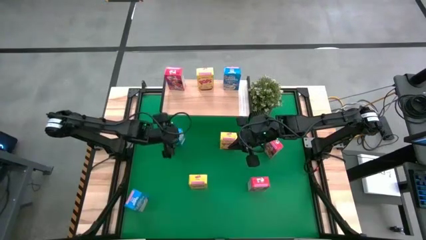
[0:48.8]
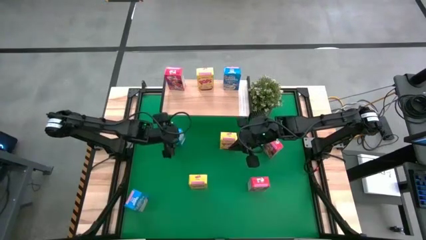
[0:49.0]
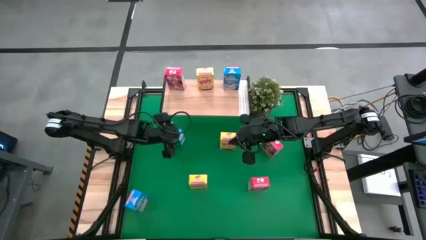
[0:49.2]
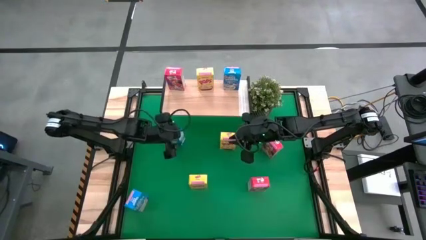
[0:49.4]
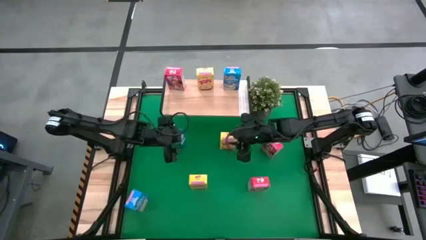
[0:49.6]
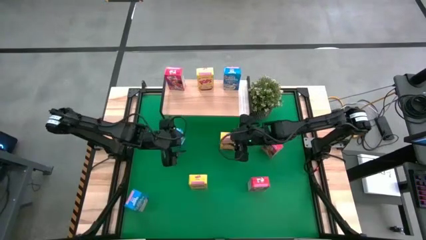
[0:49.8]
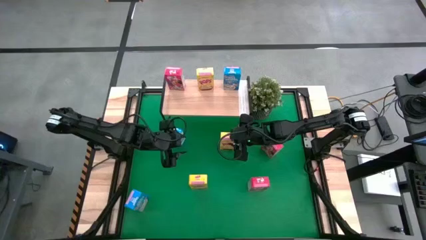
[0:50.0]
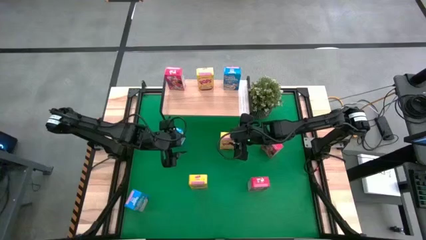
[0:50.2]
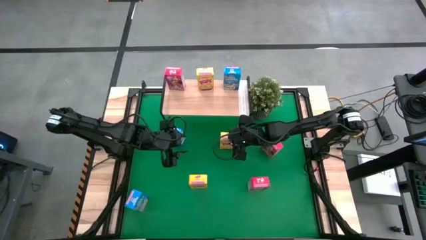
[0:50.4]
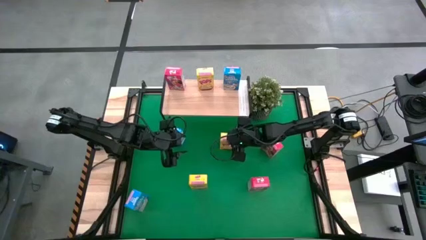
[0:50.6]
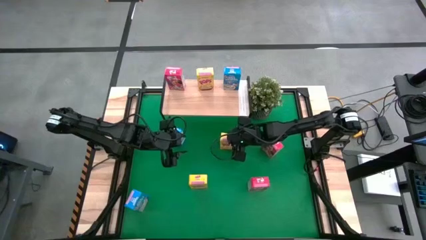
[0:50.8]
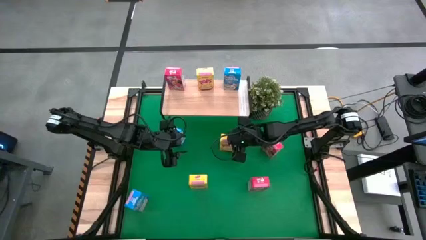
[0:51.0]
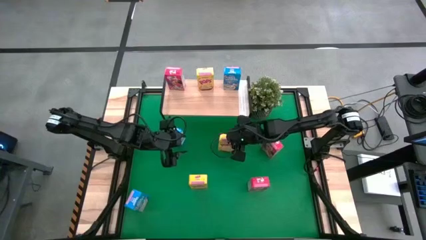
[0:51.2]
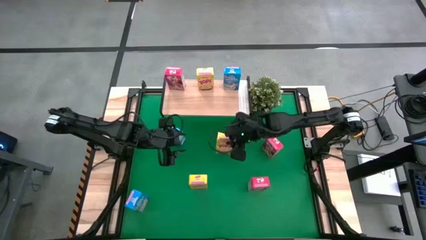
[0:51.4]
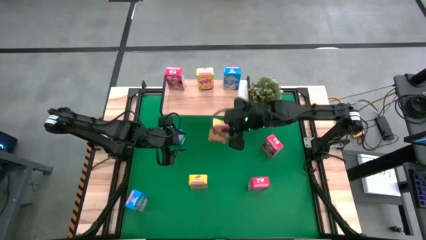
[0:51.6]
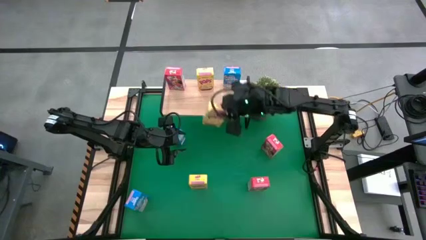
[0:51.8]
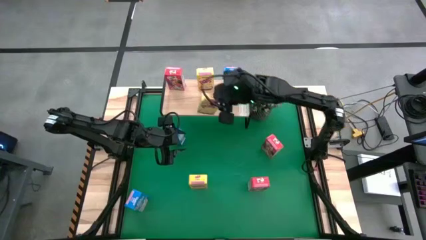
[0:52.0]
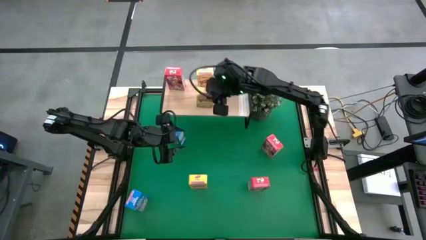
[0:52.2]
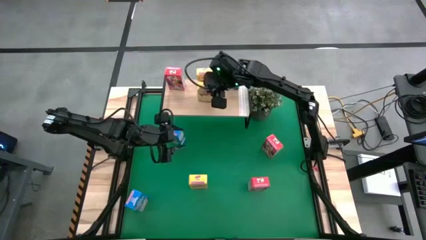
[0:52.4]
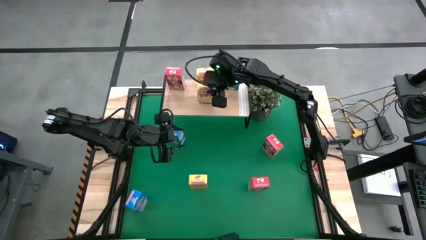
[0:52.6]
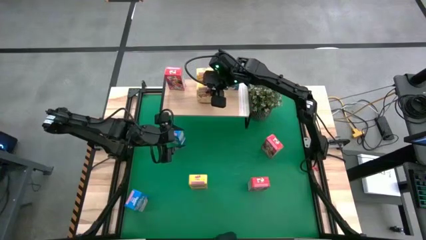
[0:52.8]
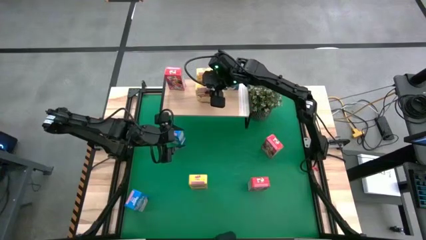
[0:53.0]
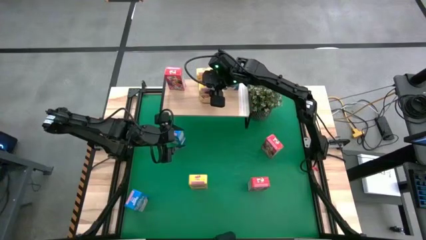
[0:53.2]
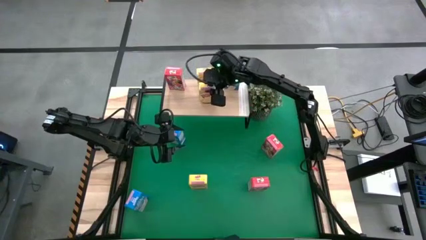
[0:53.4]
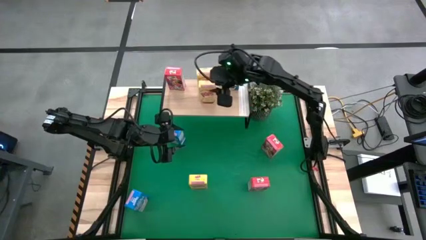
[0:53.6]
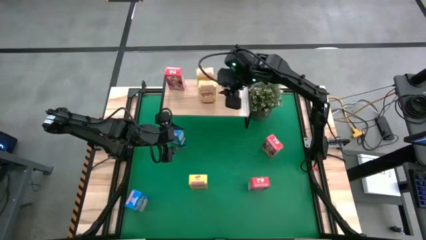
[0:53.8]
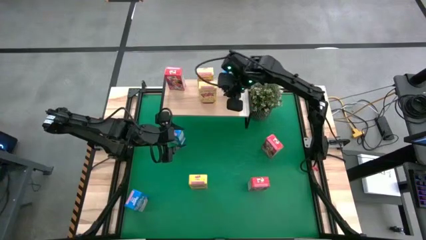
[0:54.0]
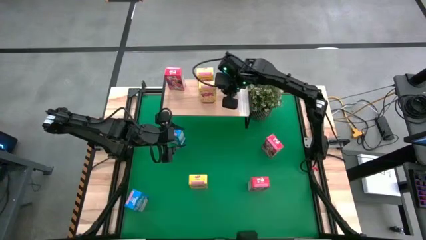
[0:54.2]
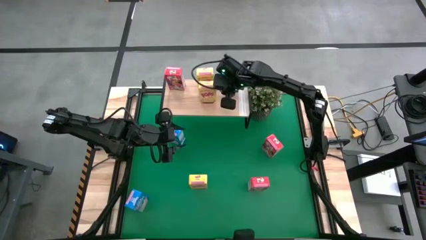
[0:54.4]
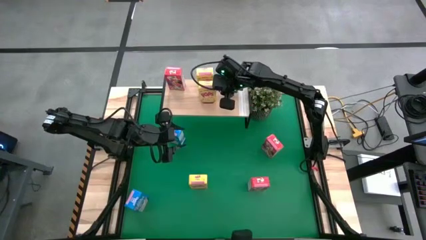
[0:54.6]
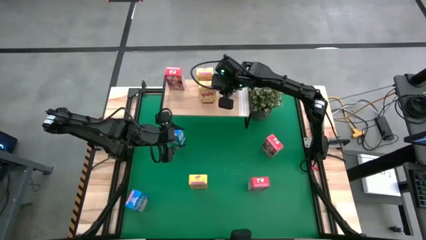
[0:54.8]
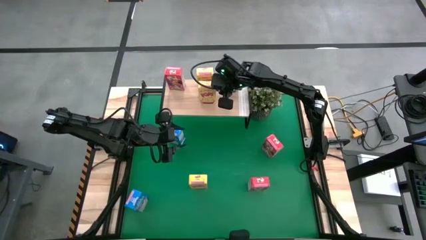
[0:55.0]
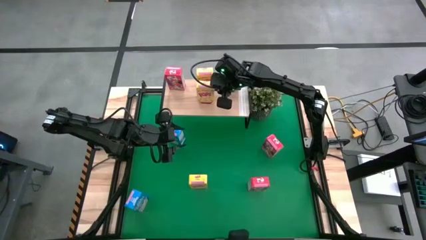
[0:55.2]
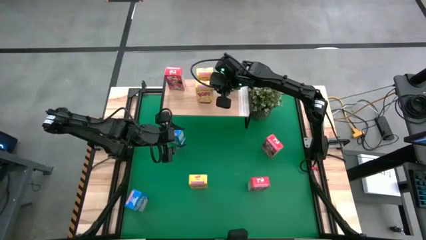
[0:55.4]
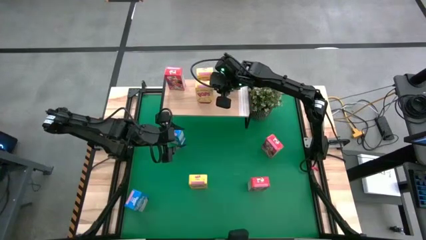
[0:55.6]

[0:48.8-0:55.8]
Task: Stack cereal on shelf
Put the top yellow cereal box on the shelf aligned with the other yellow cereal box

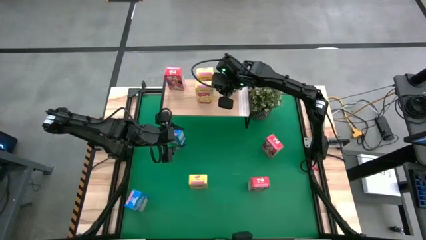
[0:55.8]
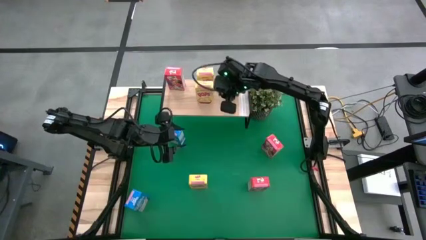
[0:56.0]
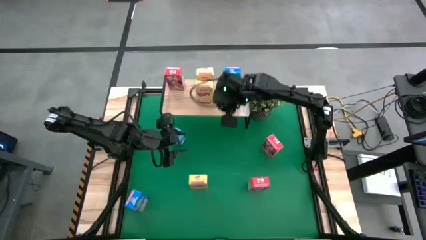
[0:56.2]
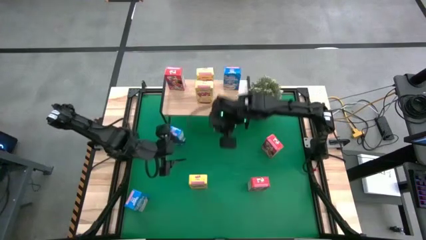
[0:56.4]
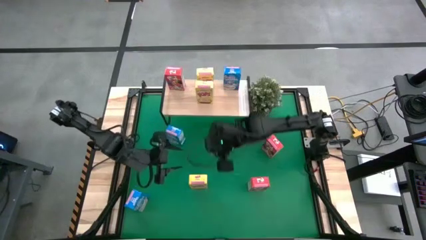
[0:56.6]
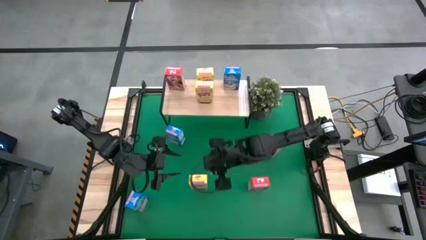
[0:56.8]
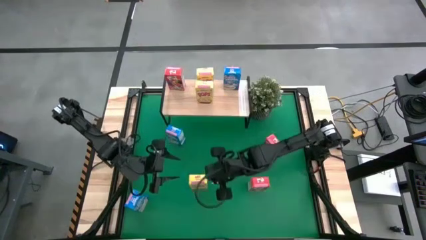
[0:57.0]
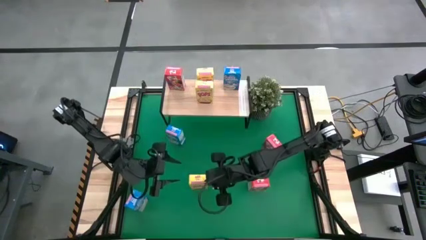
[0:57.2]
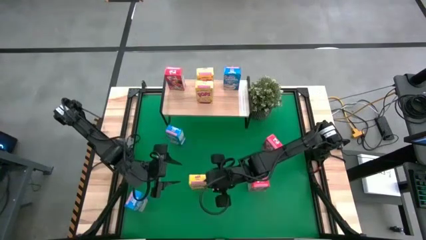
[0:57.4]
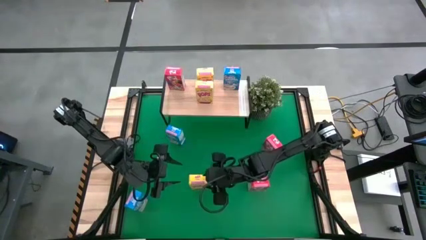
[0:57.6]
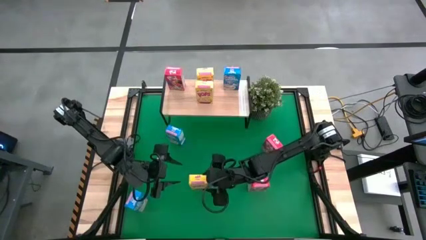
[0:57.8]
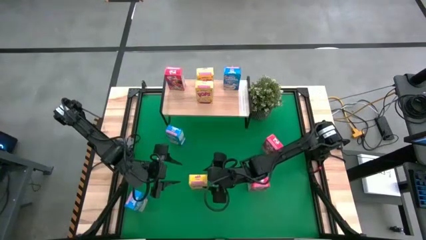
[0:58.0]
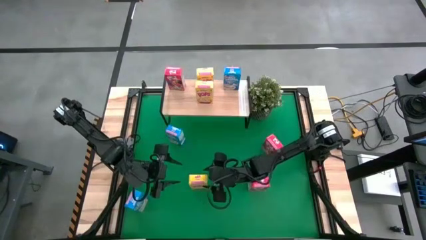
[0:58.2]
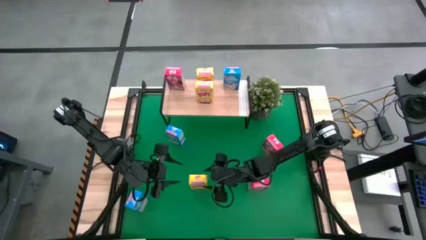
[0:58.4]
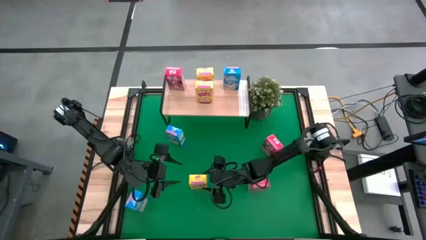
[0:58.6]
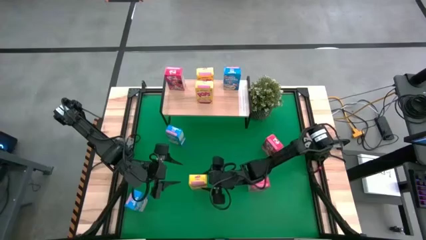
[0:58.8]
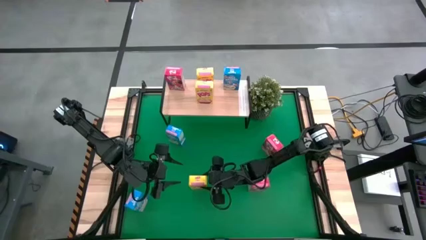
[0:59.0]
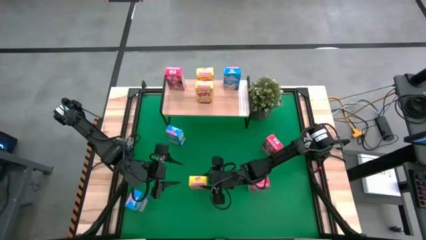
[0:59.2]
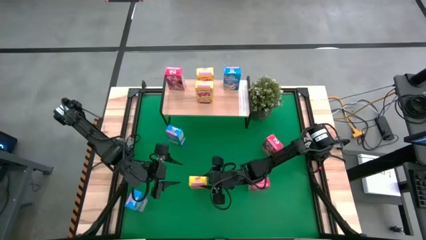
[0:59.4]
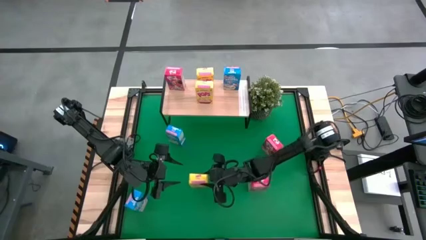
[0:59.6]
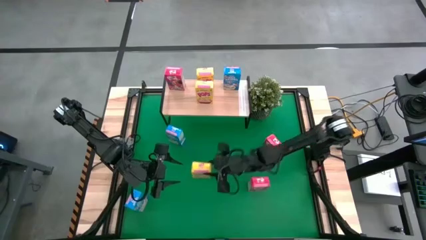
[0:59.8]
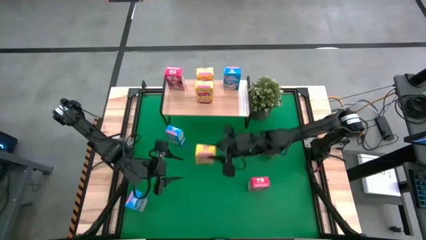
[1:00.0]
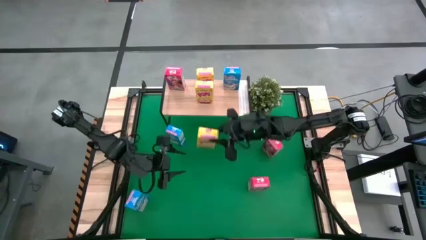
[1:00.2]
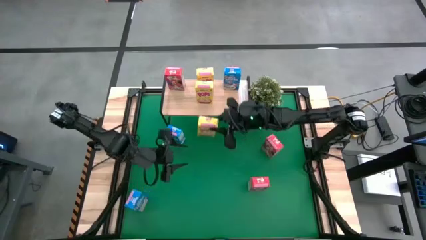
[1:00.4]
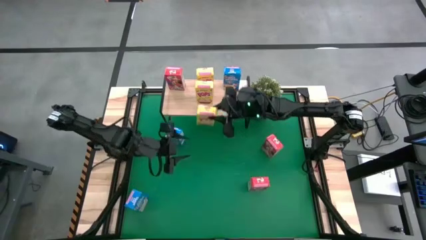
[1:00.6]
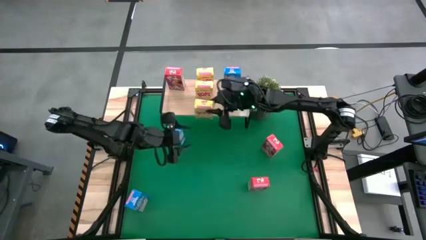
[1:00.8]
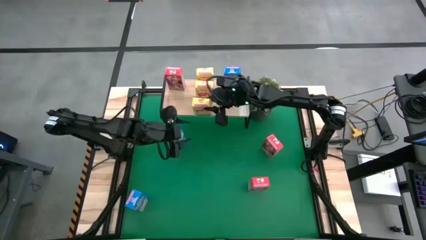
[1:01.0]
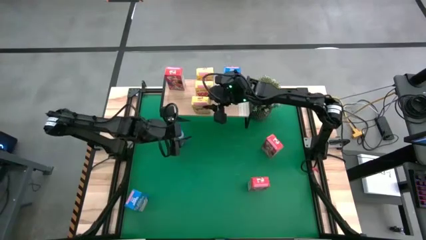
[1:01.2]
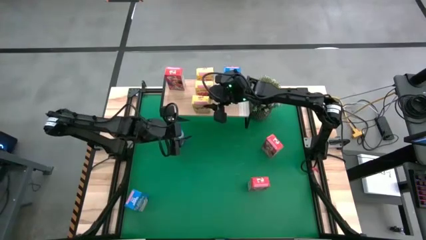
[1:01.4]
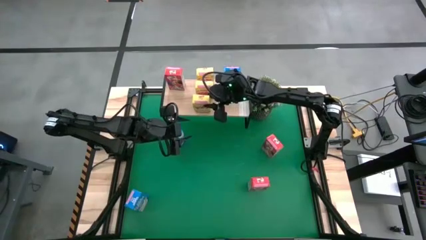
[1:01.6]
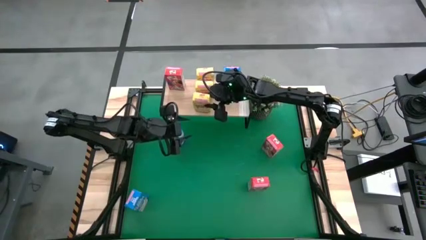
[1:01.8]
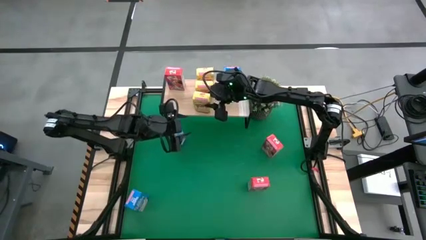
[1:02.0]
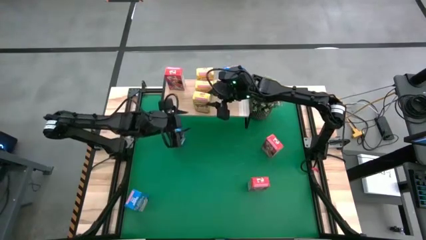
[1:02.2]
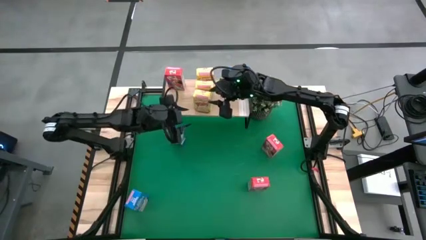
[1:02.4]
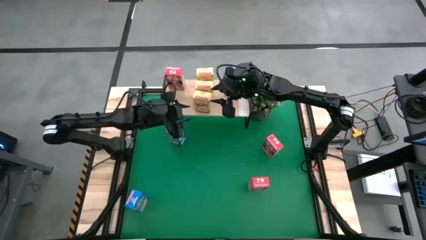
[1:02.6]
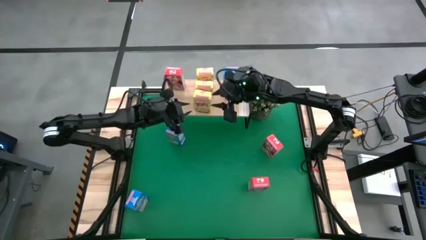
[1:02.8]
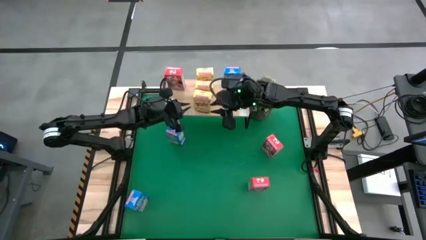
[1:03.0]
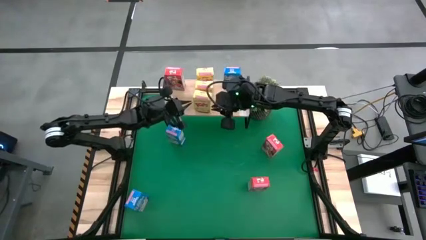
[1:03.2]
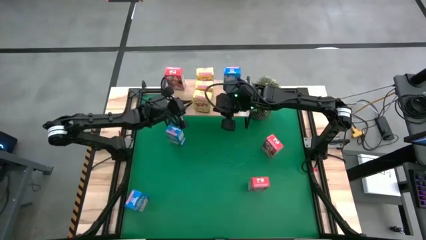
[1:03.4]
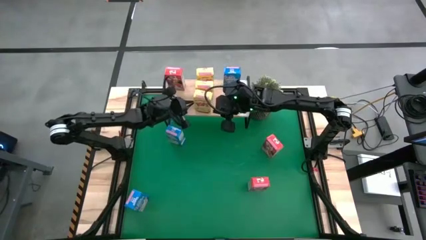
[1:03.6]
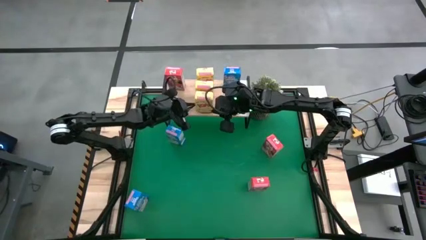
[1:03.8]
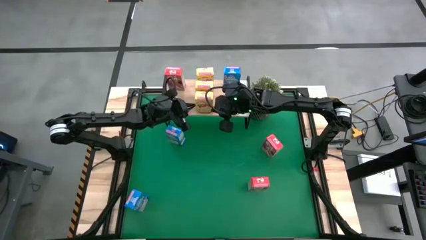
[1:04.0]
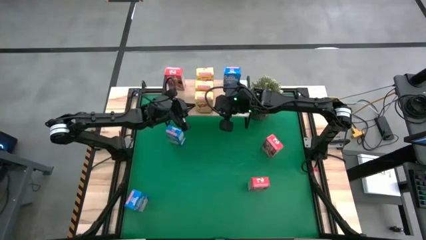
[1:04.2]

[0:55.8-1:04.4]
Put the yellow cereal box on the shelf aligned with the other yellow cereal boxes

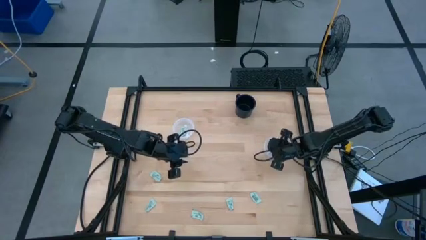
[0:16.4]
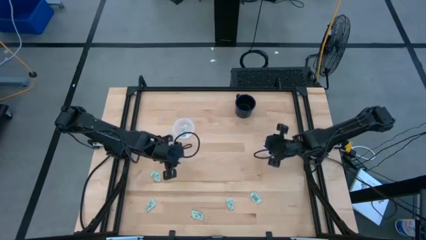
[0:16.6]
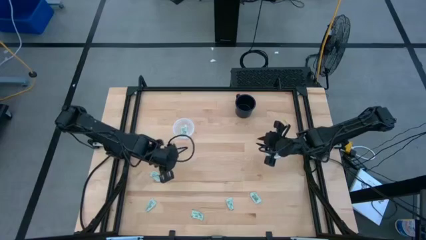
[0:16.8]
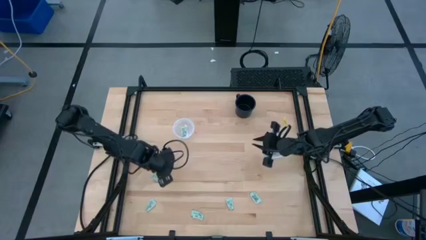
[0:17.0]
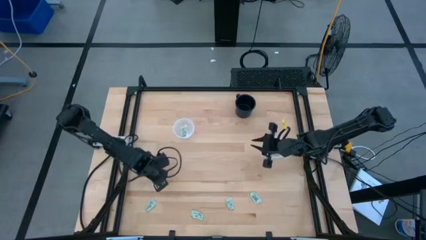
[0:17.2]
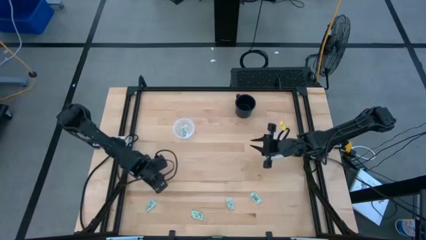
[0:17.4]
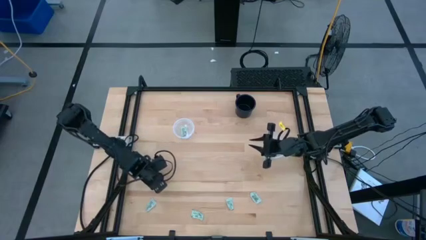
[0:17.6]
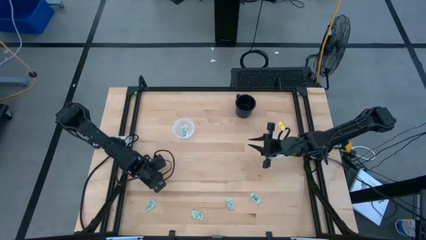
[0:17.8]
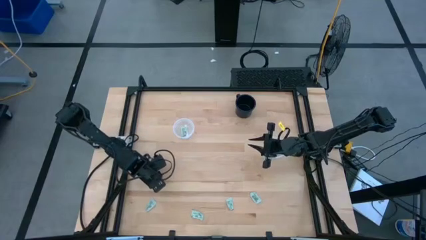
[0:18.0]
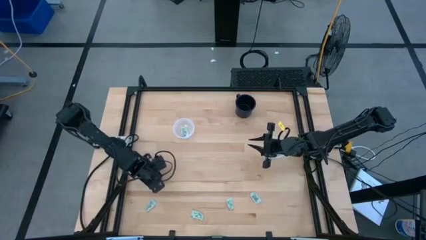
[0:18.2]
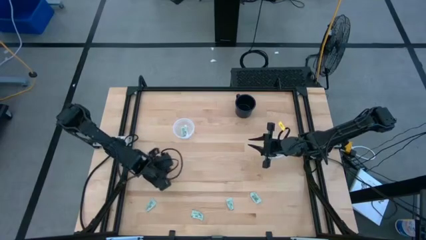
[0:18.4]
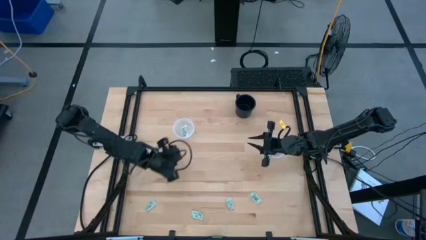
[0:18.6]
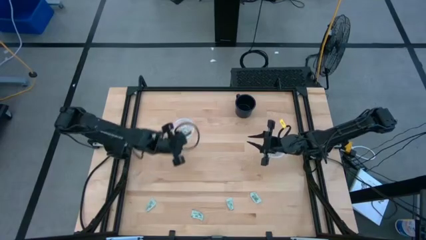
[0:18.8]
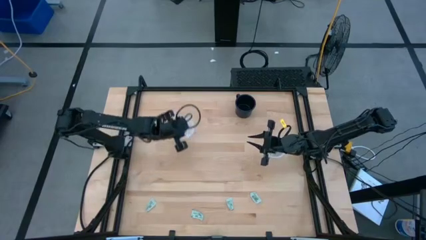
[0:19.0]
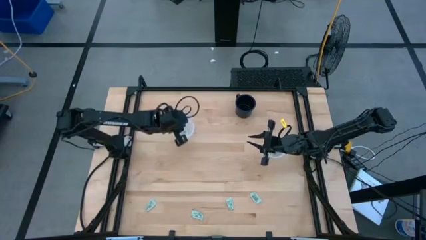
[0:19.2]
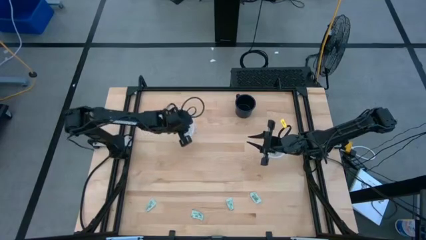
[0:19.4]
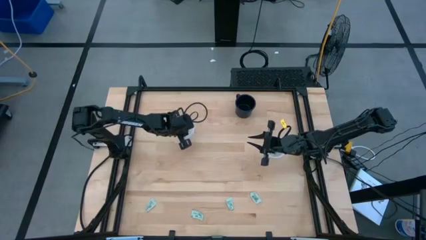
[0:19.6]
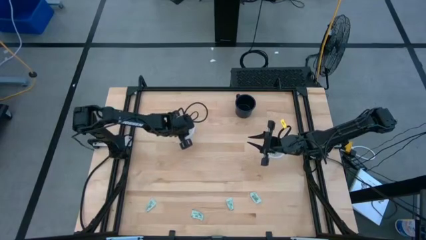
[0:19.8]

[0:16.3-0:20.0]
Task: Pick and place items into bin
Put the white stevia packet into the left transparent bin
